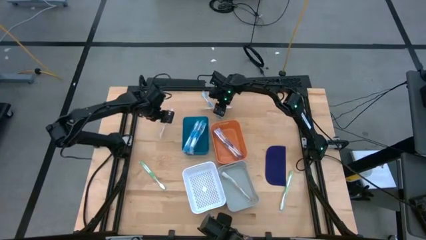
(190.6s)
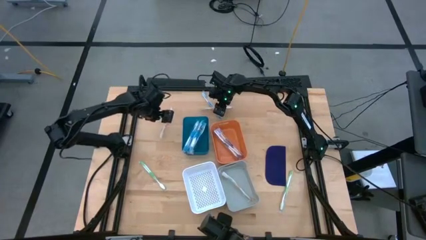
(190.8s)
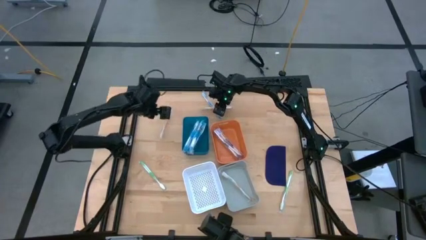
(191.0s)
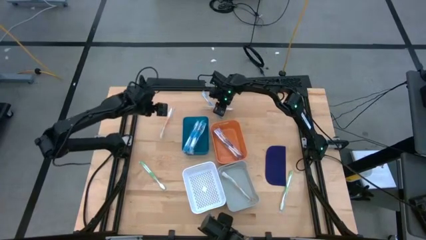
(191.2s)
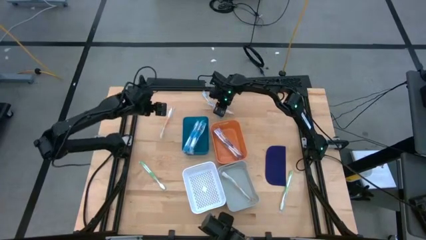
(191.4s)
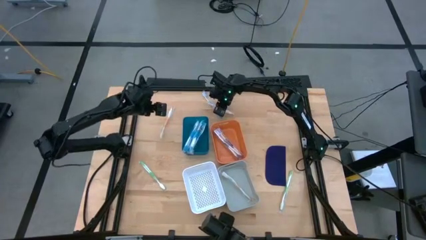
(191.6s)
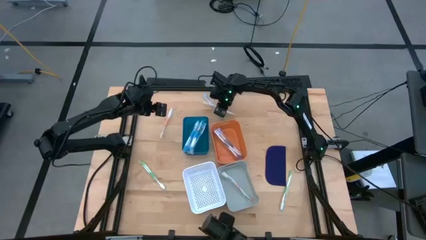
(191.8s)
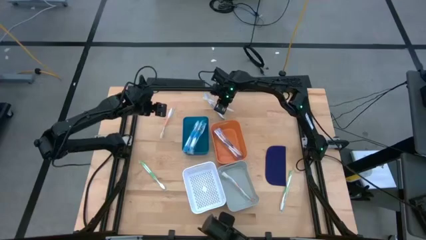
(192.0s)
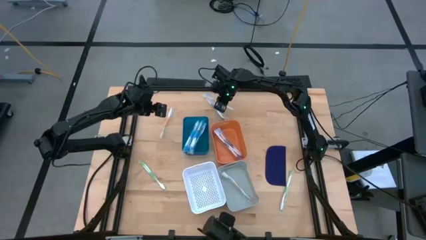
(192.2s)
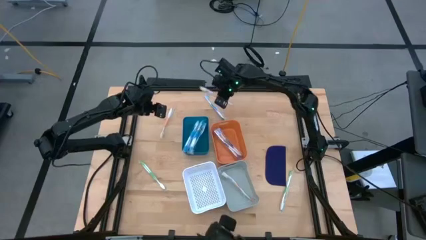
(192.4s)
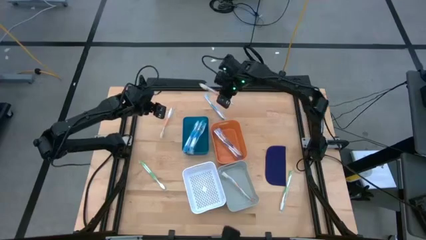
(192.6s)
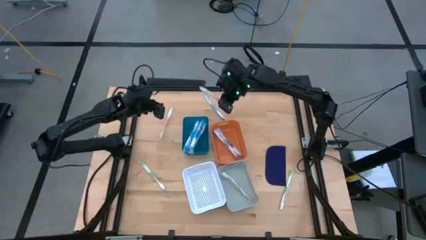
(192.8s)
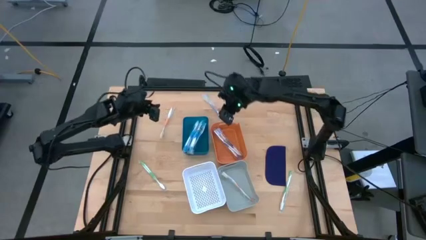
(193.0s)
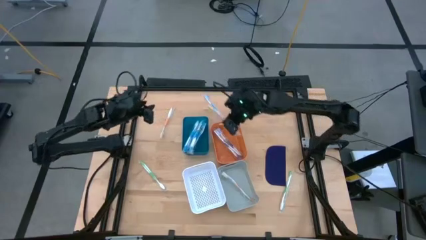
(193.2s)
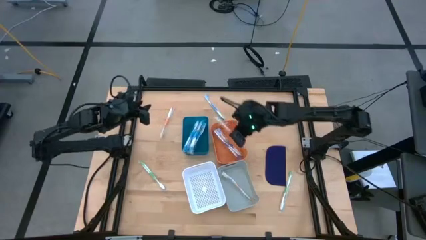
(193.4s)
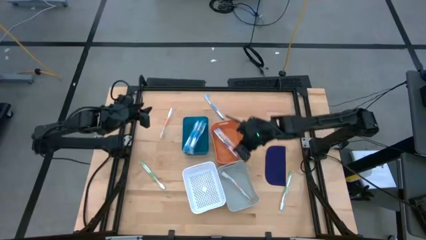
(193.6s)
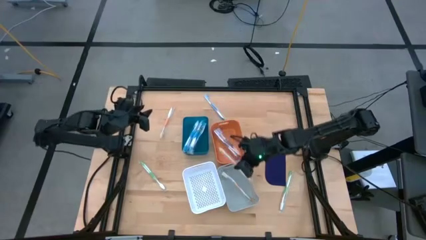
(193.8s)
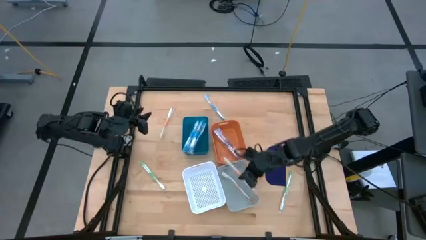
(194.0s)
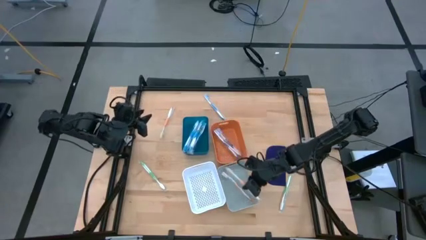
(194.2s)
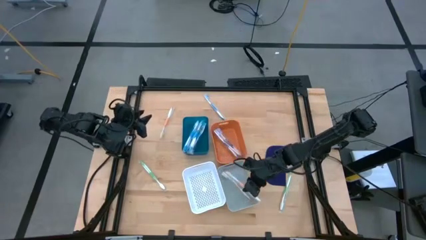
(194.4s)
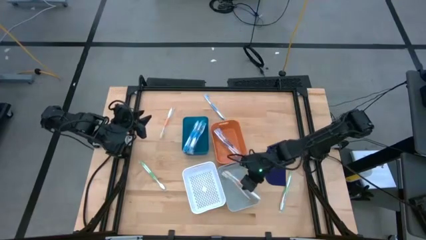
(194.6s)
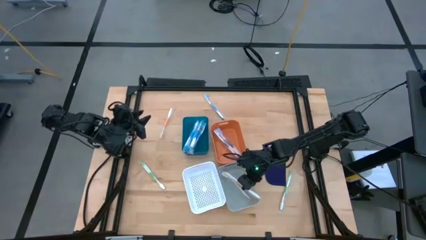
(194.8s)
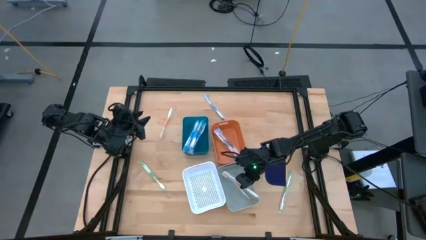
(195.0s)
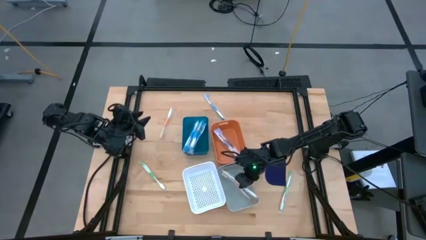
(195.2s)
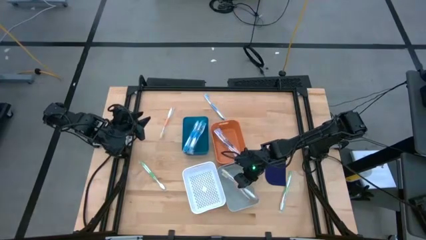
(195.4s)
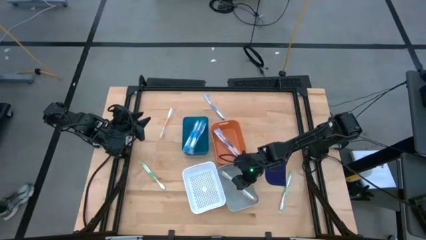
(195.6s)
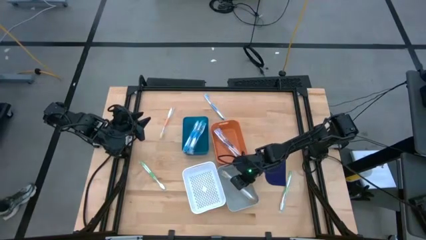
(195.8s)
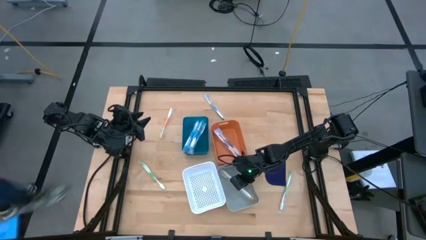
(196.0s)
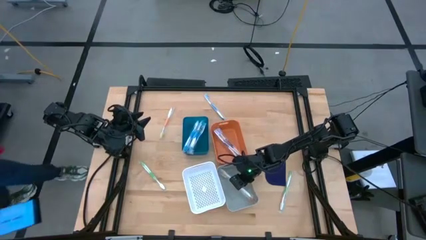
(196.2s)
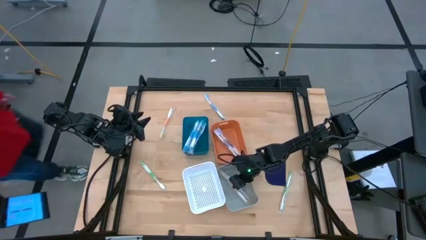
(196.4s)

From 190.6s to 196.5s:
Task: Pick & Place Toothbrushes
Put the orange toothbrush into the gray bin

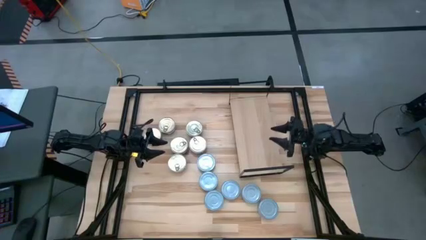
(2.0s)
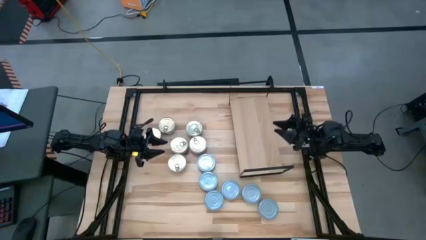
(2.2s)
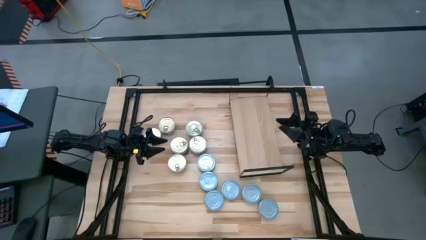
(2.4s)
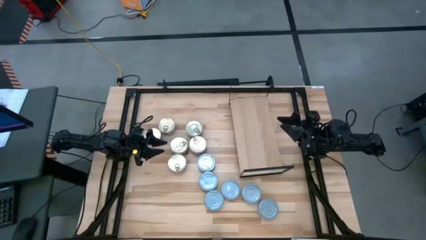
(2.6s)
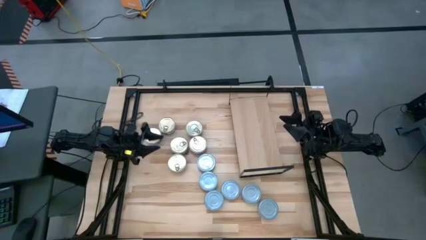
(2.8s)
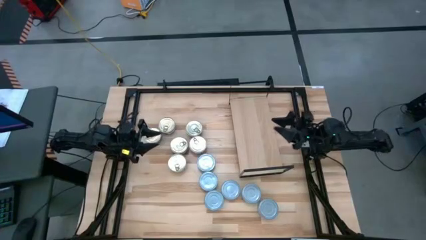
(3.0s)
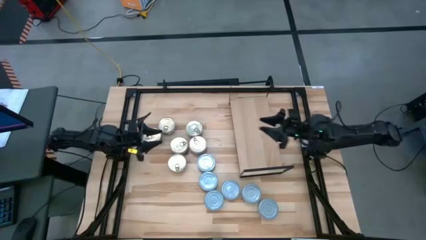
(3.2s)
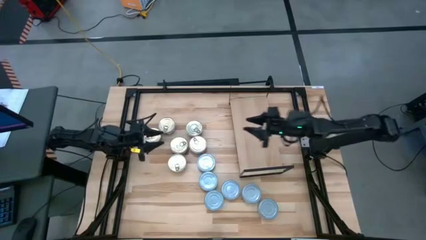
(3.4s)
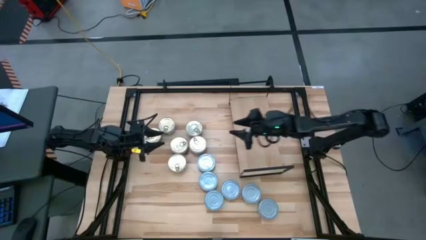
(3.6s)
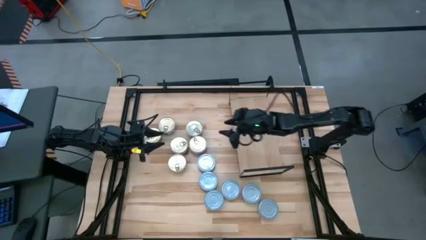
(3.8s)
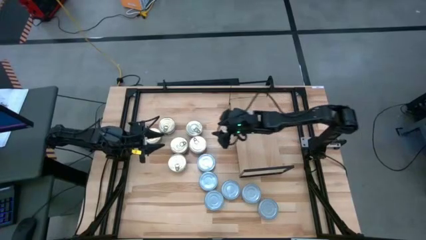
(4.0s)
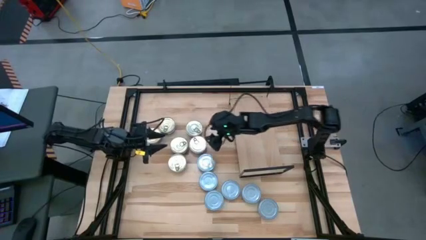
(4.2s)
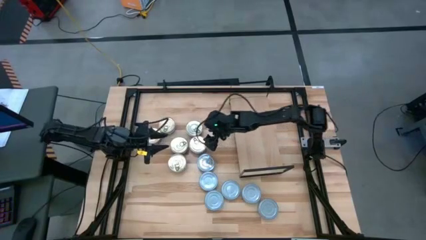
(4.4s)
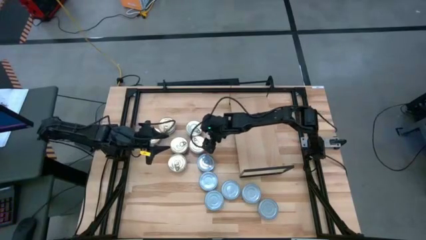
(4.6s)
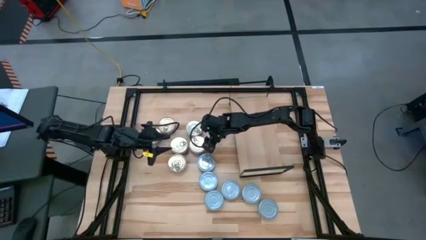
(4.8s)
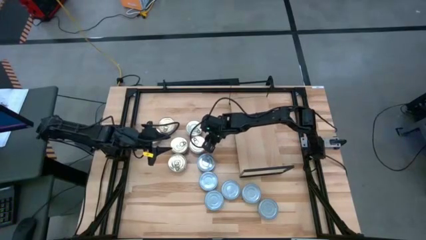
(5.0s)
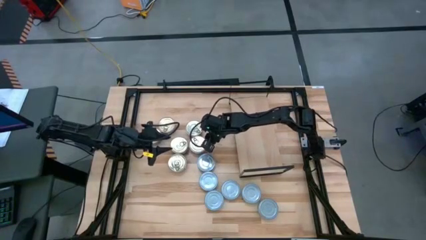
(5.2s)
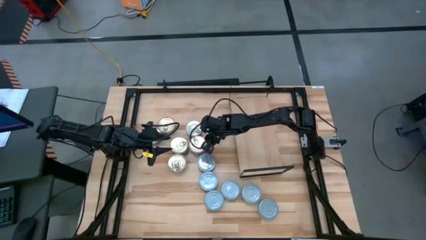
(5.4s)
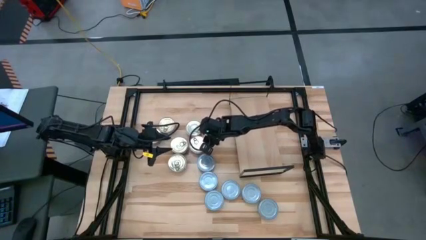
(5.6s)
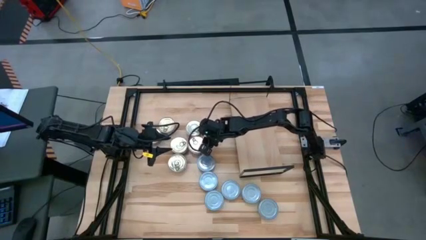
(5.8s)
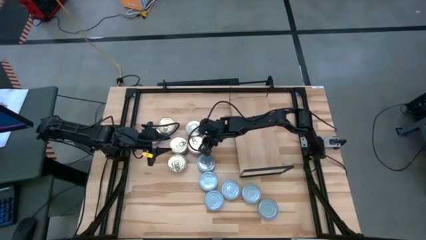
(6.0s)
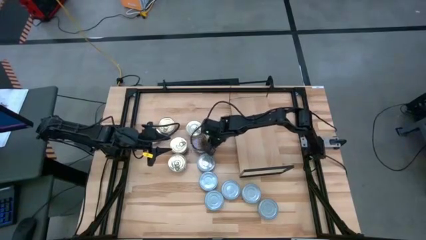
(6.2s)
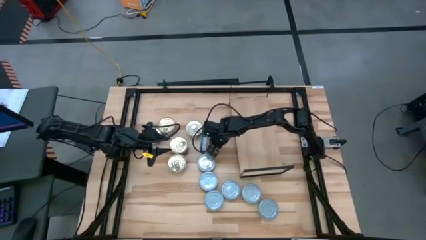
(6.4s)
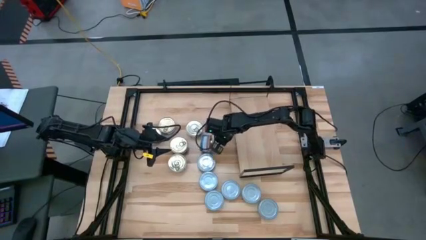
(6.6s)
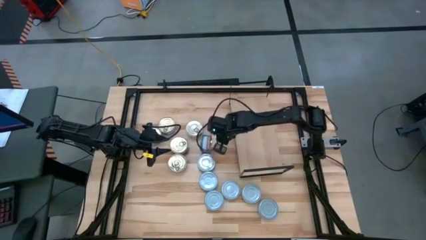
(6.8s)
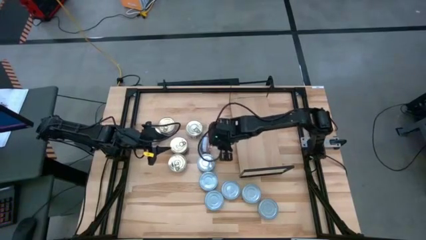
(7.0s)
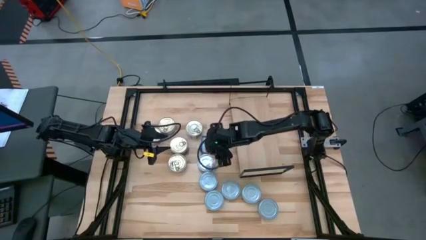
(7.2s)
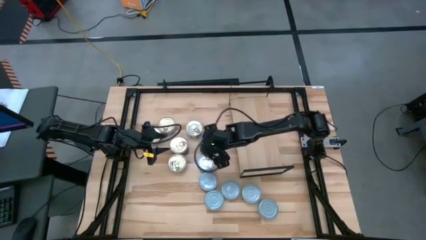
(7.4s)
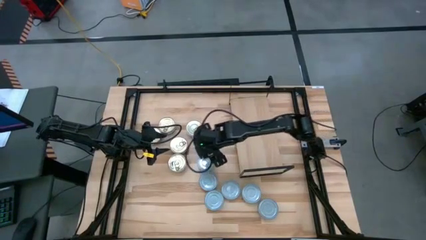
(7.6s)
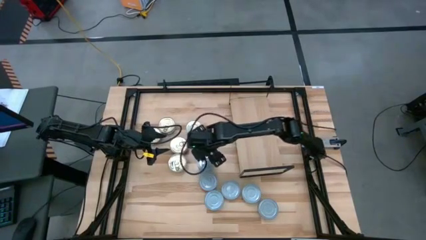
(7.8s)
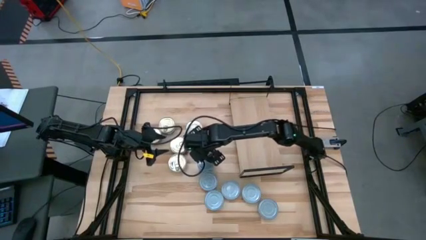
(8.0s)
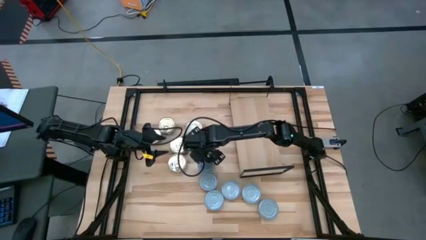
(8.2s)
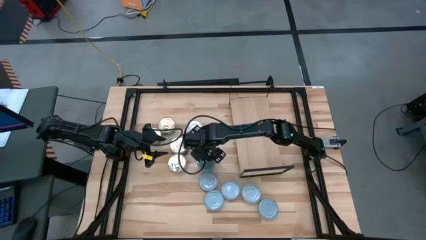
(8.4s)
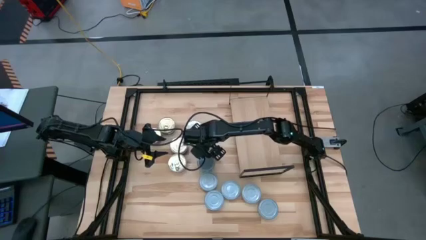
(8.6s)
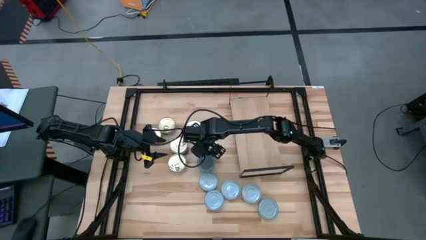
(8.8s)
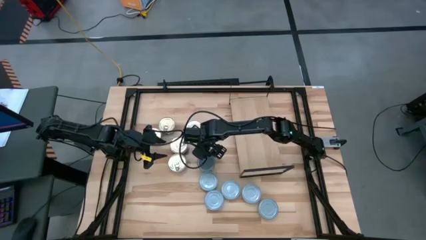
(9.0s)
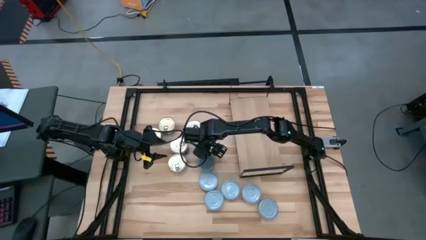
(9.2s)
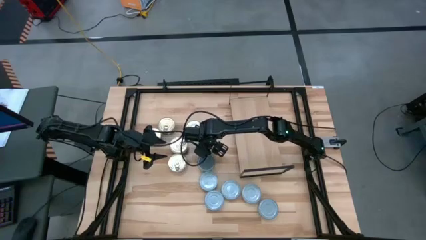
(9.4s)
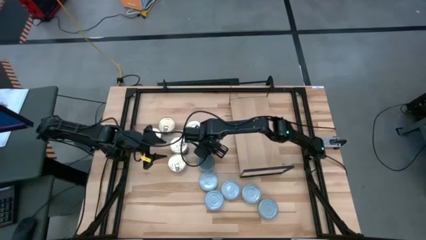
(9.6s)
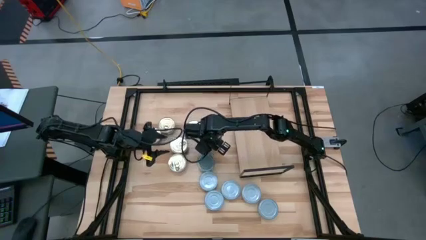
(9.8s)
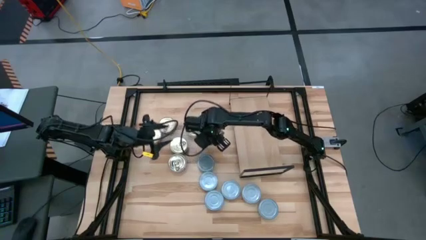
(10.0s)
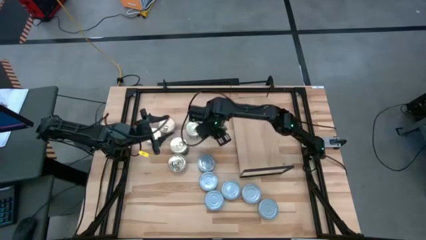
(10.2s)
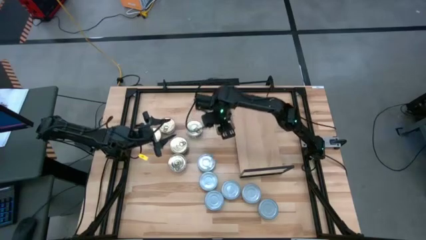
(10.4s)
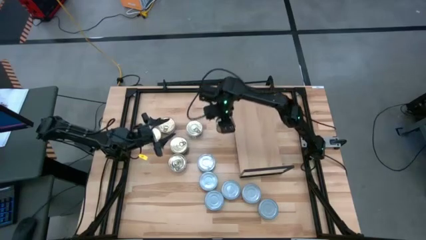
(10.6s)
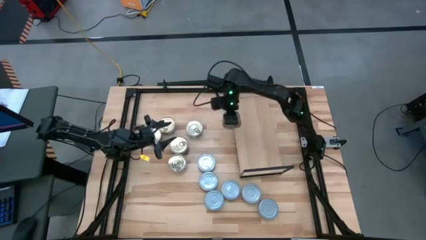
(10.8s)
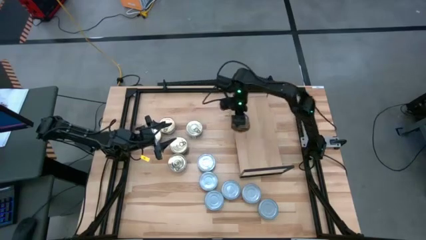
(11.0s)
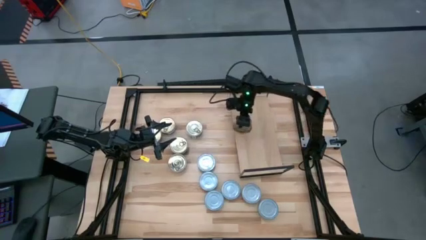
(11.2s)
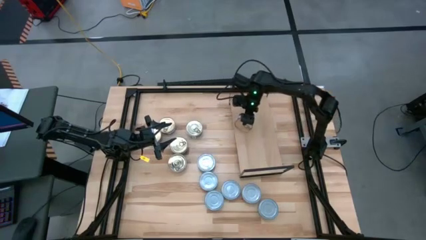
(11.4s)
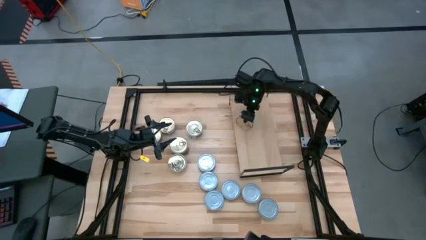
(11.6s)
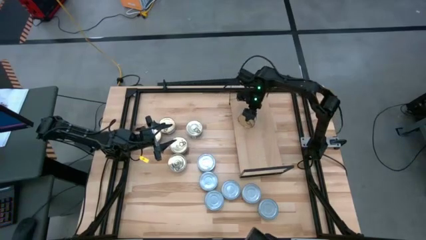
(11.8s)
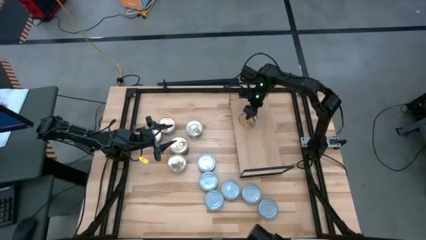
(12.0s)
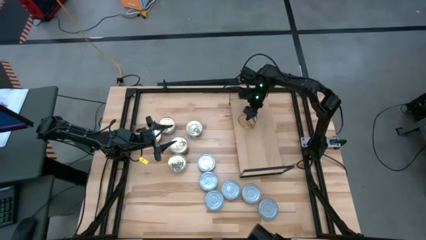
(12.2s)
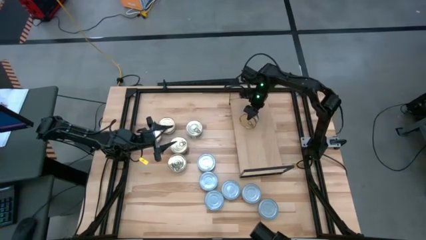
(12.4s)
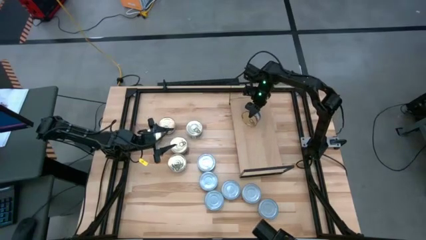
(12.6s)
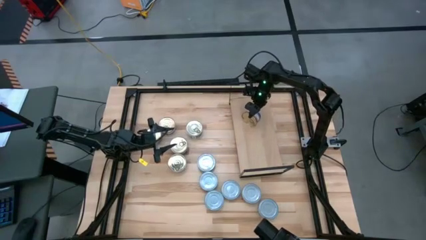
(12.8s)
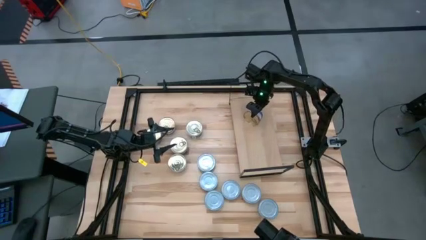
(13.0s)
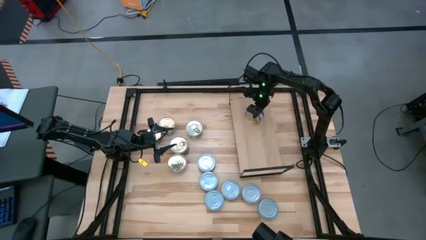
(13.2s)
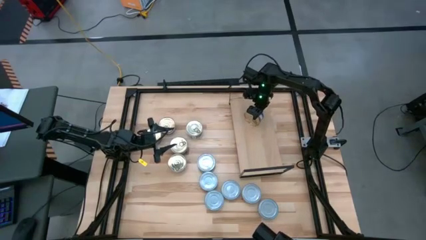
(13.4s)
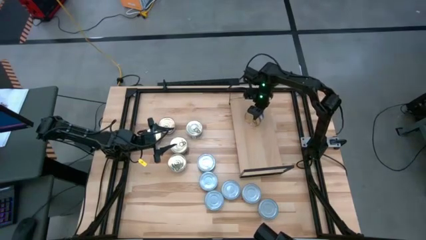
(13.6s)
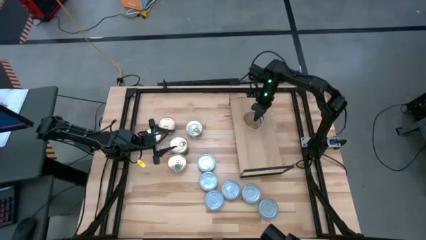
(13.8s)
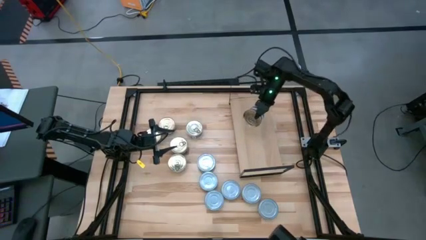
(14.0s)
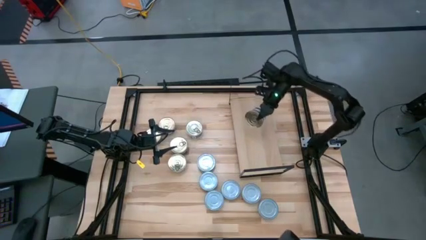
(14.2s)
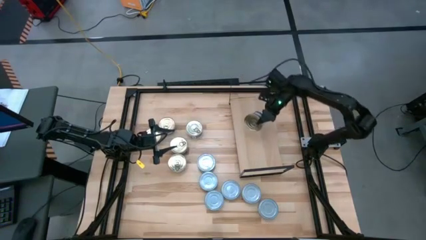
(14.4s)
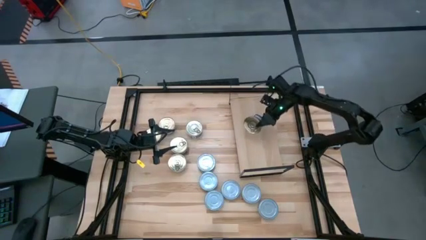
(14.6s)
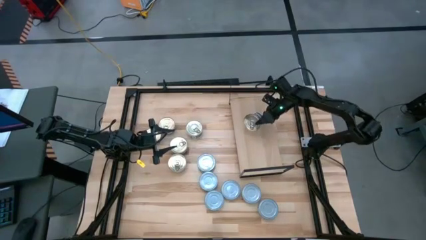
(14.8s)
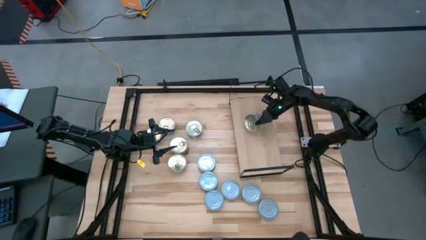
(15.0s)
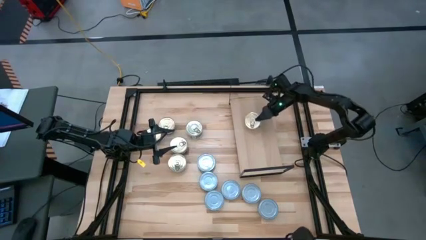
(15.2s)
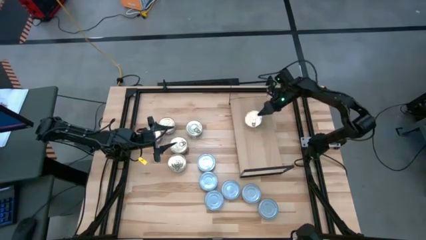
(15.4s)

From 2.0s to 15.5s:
Task: Stack canned seafood by type on shelf
Put the blue-pink tuna can on the shelf
